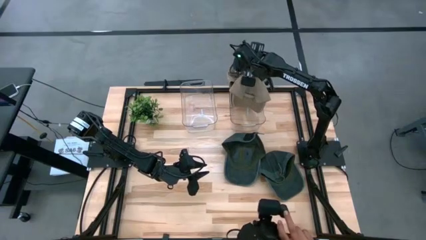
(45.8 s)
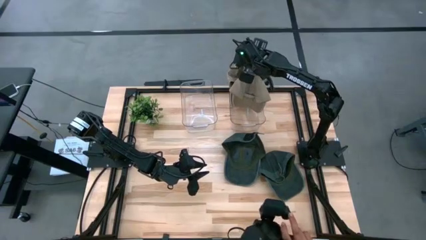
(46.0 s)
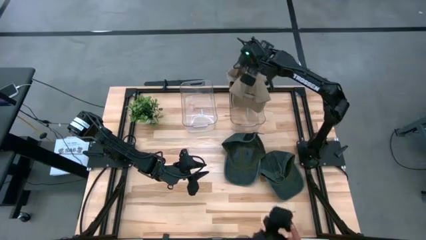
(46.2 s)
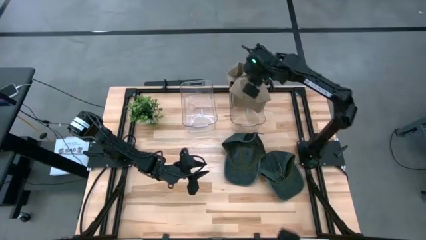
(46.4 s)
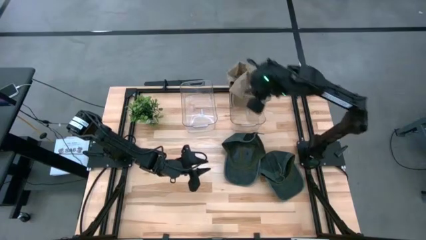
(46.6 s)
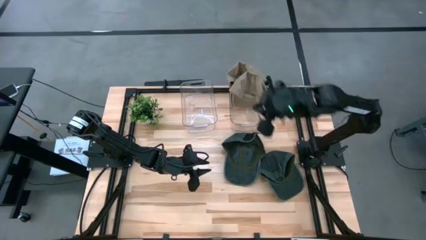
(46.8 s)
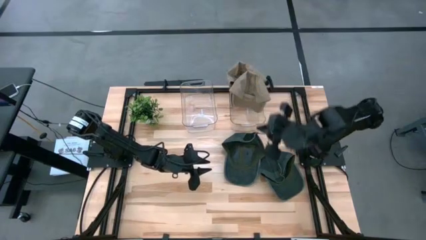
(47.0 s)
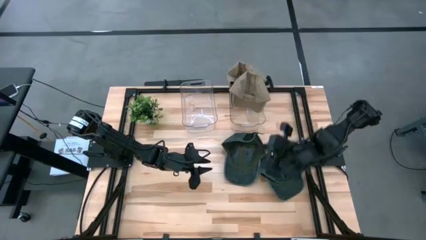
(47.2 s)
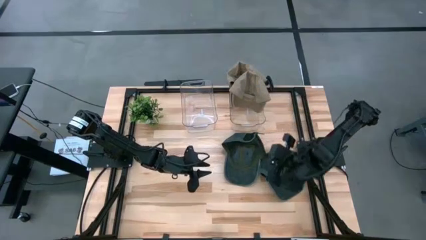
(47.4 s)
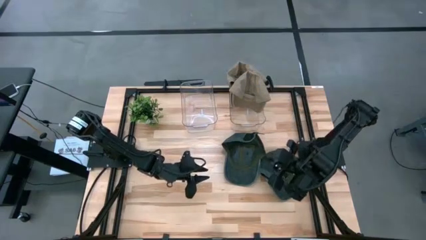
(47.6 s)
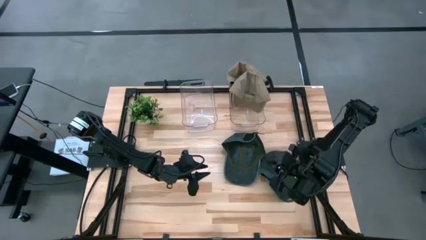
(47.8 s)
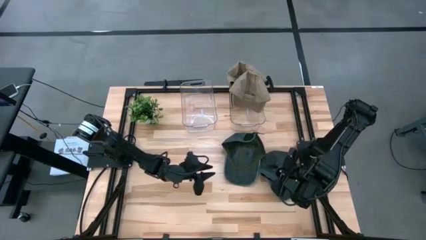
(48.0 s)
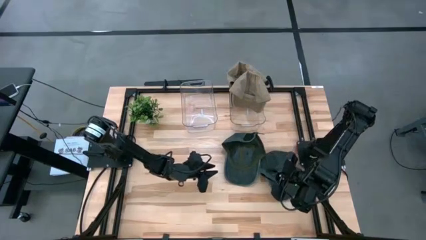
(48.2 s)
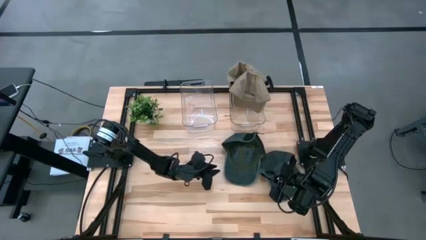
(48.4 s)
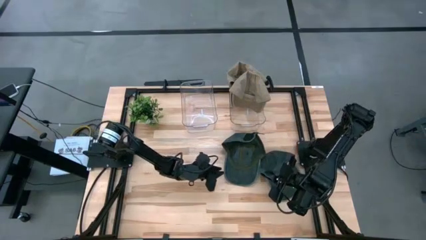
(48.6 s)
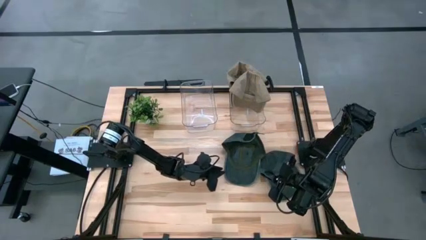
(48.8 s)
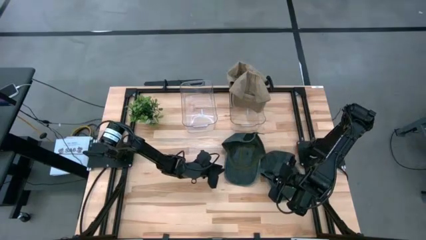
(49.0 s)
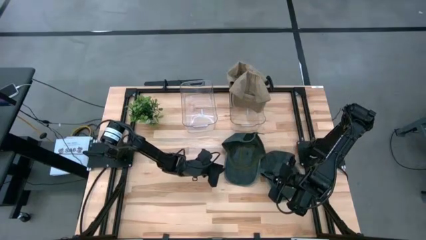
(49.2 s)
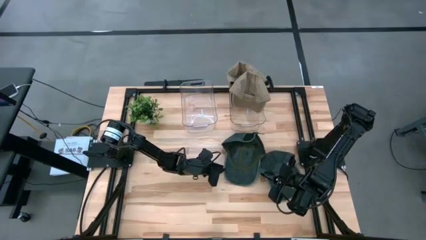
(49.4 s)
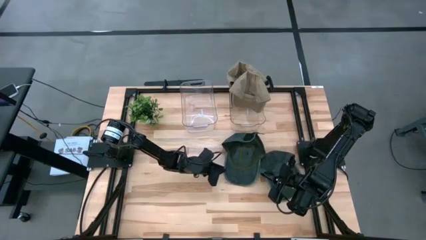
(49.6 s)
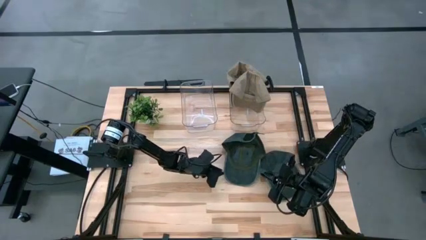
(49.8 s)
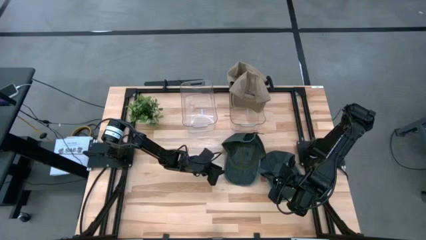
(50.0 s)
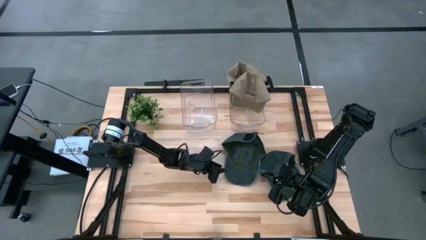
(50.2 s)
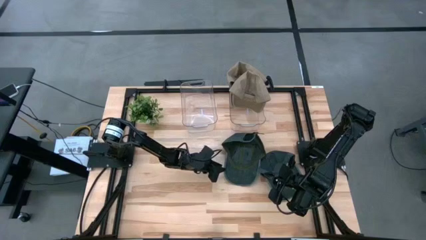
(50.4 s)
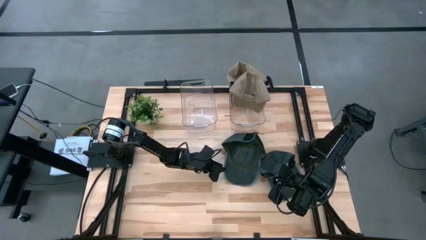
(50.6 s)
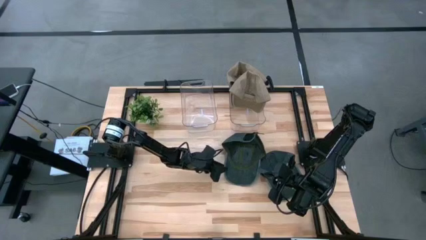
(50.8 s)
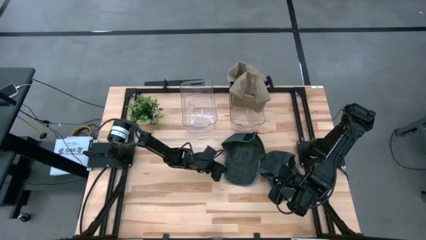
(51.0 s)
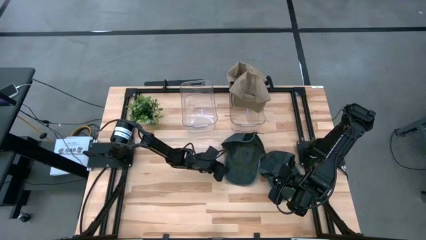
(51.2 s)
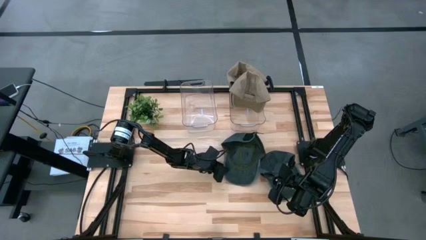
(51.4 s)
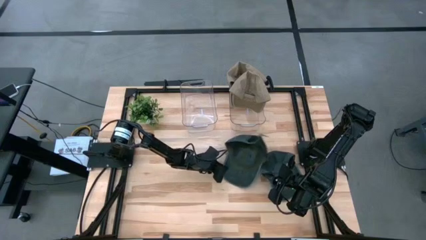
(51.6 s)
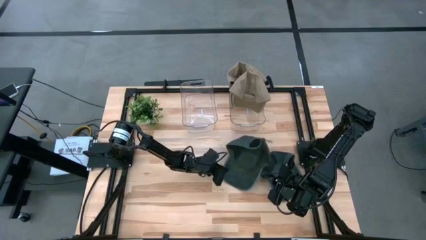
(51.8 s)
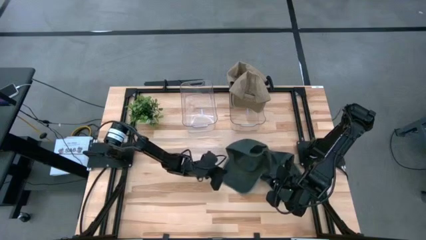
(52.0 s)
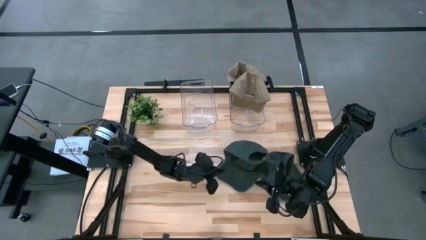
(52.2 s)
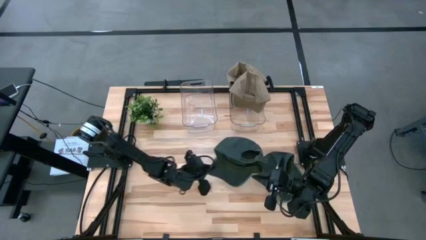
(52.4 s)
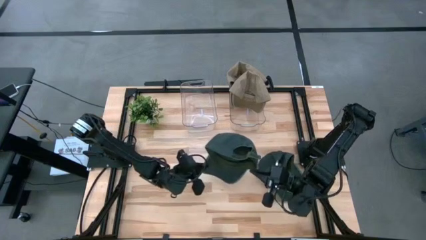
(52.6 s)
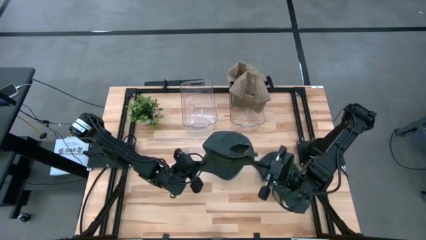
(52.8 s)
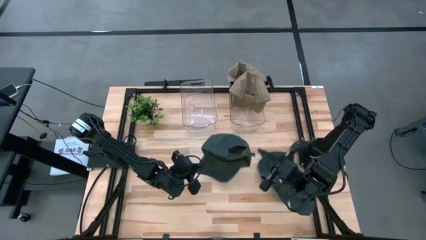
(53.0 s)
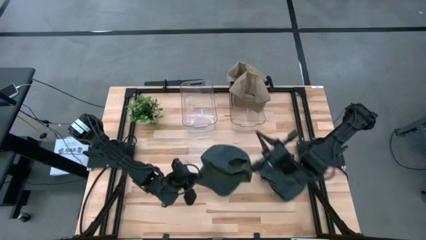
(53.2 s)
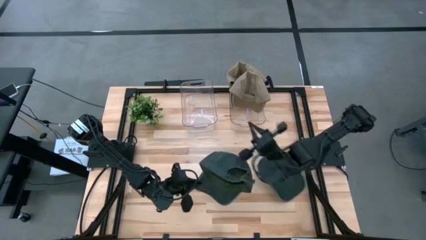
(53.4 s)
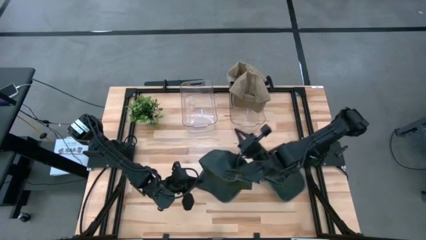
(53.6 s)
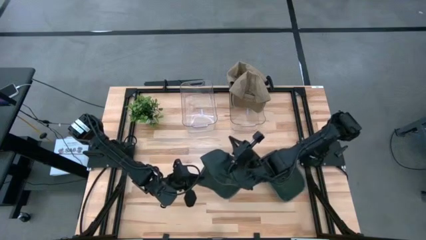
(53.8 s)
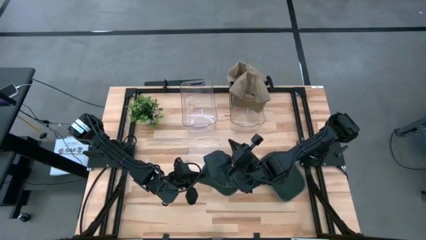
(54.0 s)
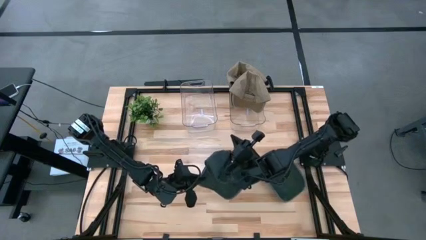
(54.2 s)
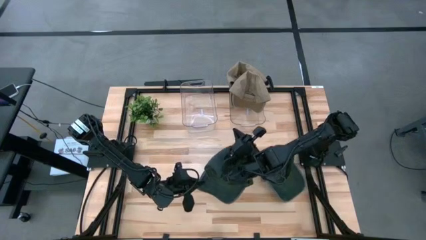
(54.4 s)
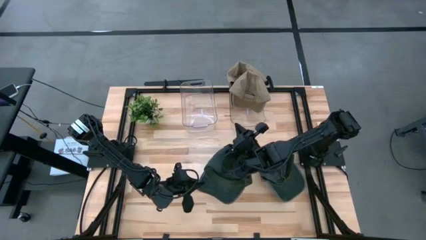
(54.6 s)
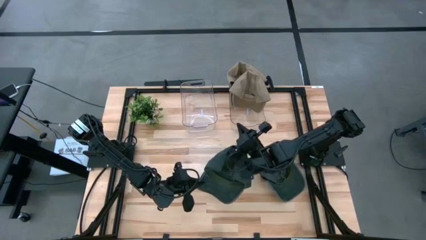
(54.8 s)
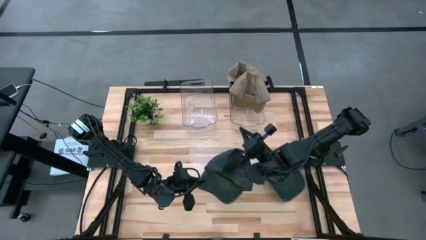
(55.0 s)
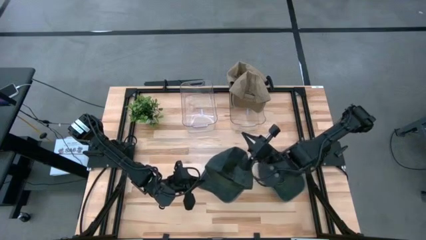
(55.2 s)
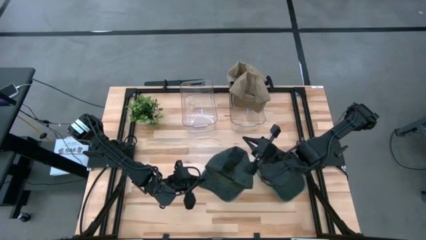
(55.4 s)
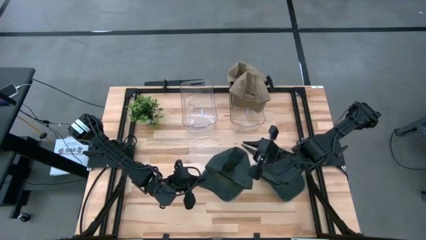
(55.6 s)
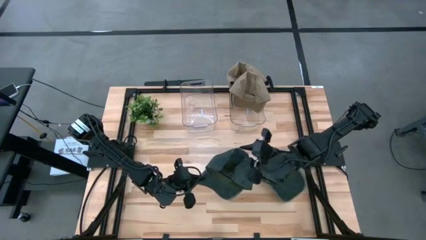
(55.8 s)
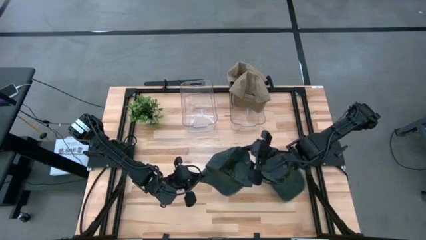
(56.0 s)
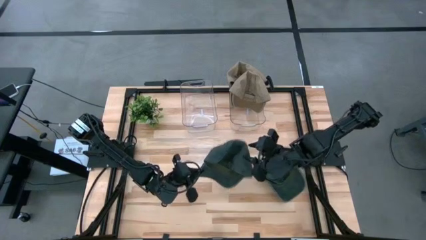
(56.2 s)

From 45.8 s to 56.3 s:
Task: Pick & Place hat
Put the left black cap into the left transparent bin
